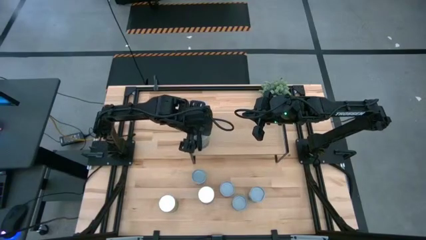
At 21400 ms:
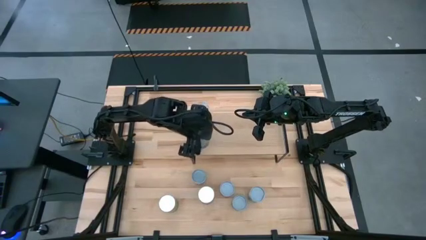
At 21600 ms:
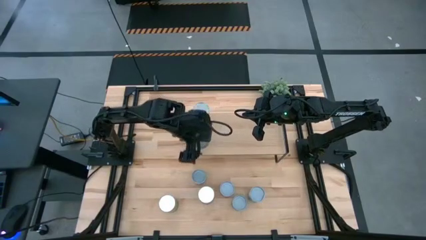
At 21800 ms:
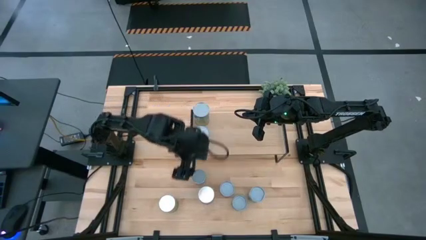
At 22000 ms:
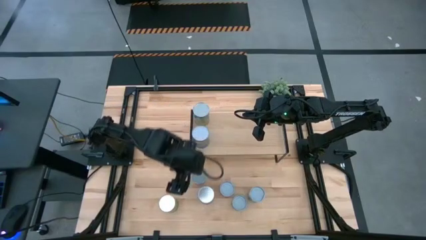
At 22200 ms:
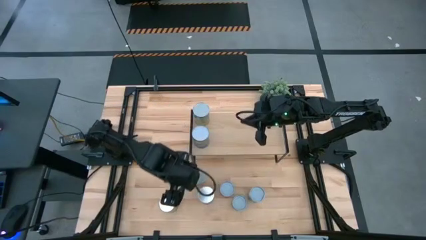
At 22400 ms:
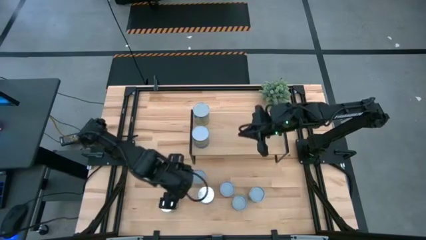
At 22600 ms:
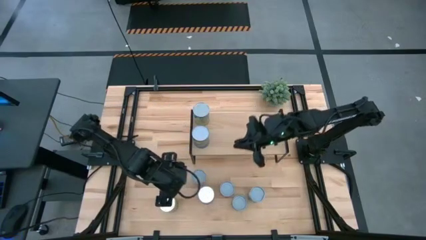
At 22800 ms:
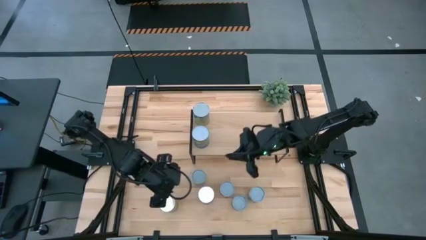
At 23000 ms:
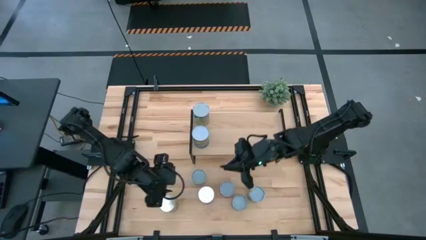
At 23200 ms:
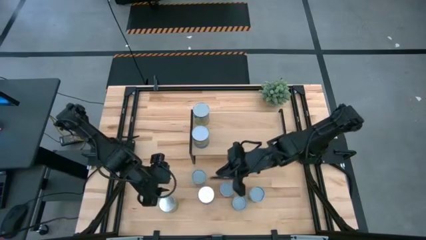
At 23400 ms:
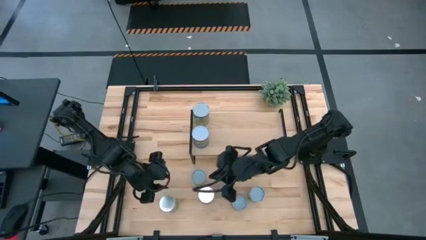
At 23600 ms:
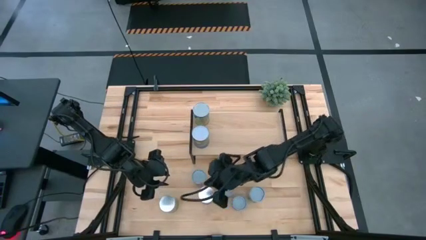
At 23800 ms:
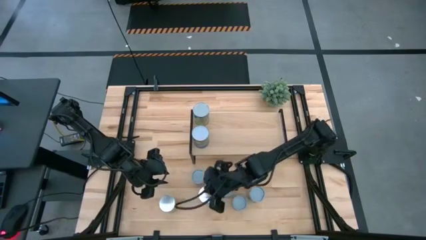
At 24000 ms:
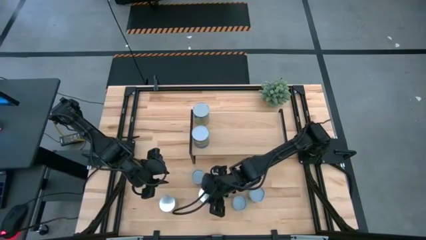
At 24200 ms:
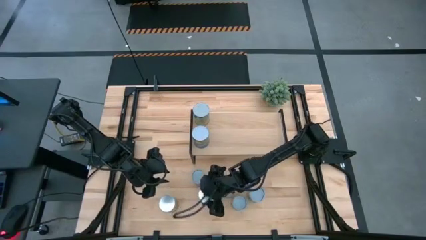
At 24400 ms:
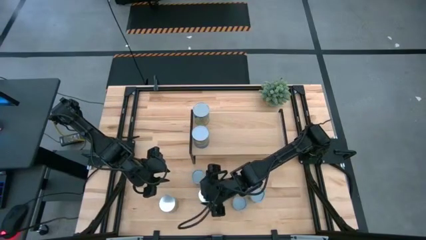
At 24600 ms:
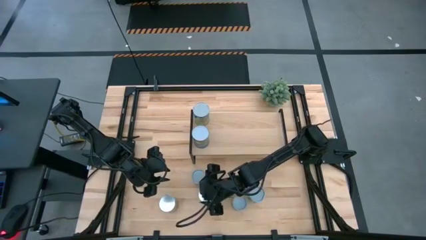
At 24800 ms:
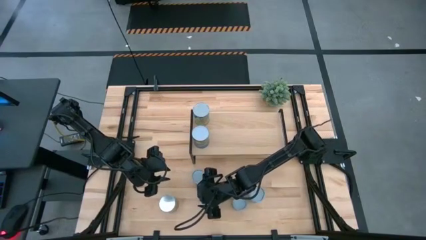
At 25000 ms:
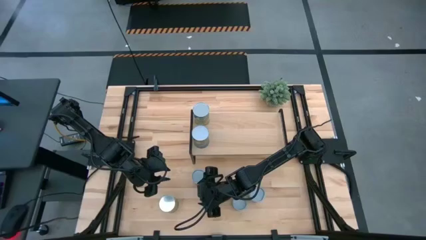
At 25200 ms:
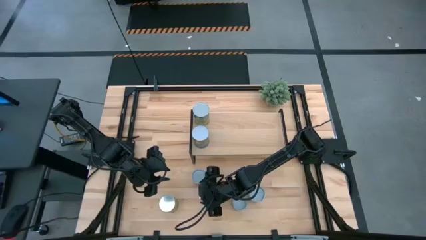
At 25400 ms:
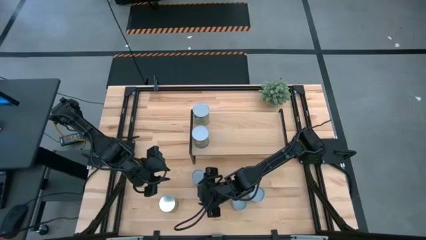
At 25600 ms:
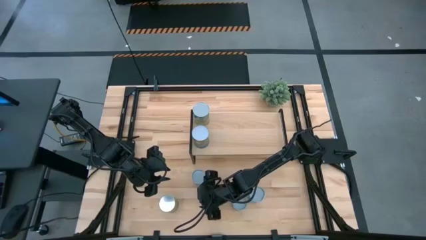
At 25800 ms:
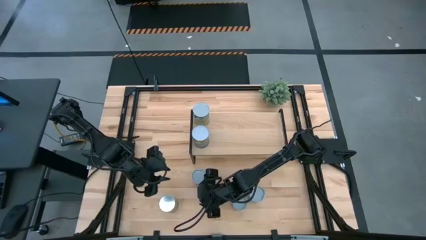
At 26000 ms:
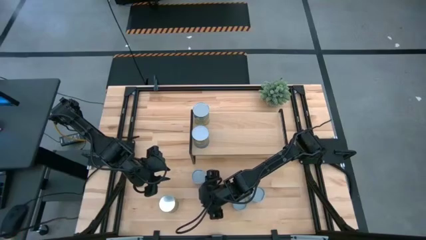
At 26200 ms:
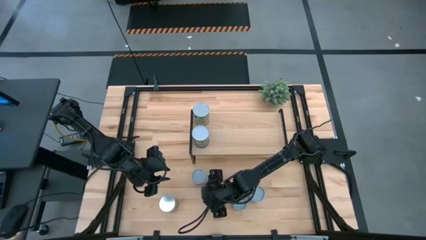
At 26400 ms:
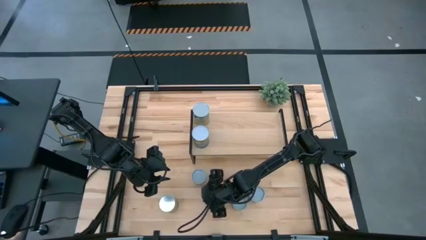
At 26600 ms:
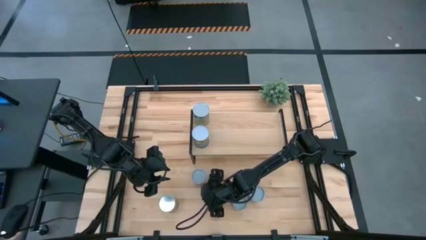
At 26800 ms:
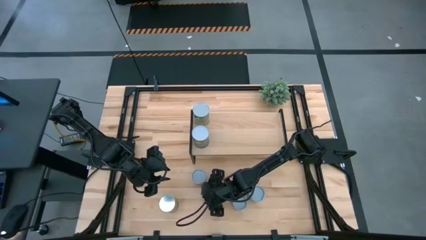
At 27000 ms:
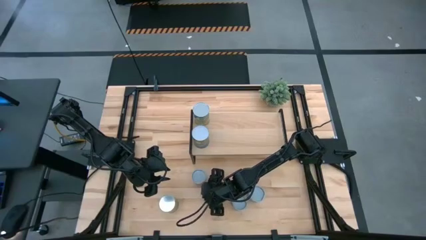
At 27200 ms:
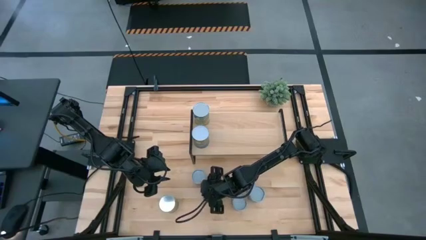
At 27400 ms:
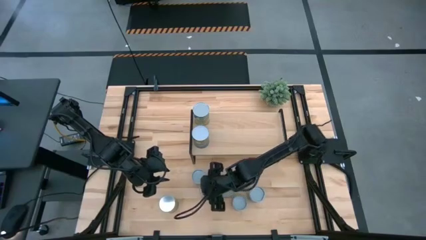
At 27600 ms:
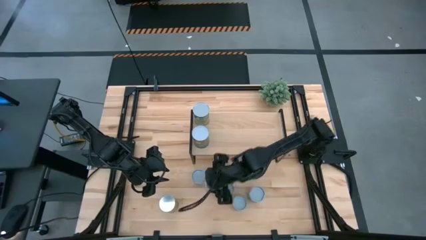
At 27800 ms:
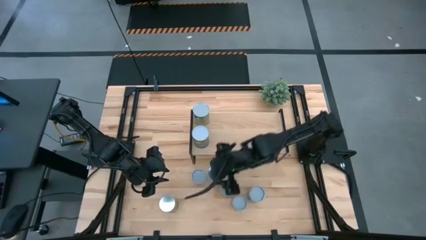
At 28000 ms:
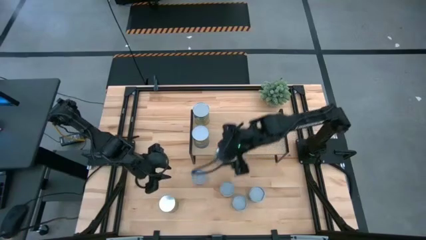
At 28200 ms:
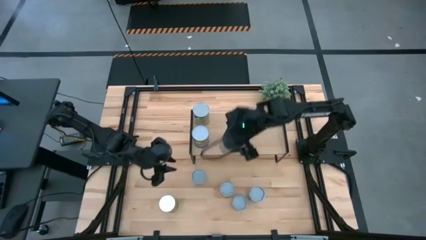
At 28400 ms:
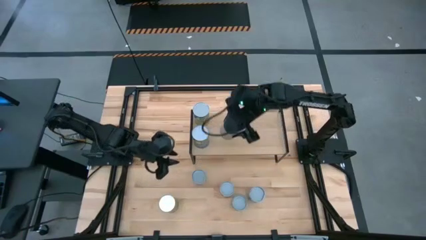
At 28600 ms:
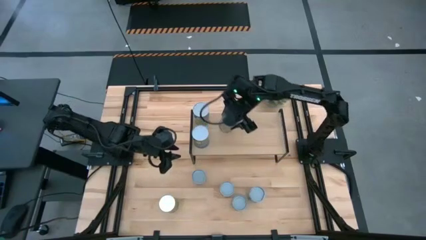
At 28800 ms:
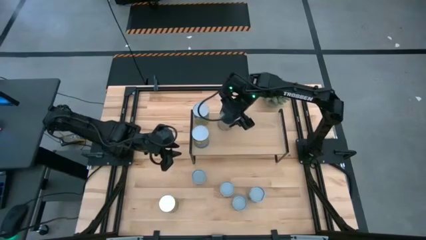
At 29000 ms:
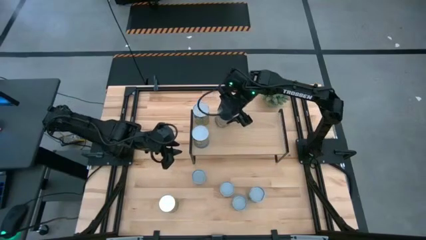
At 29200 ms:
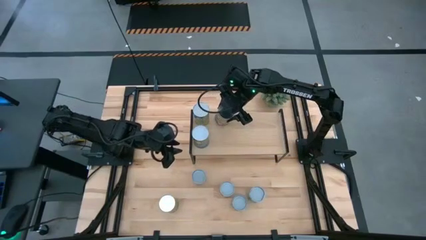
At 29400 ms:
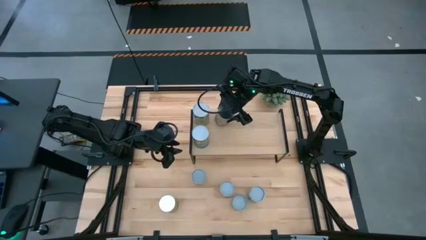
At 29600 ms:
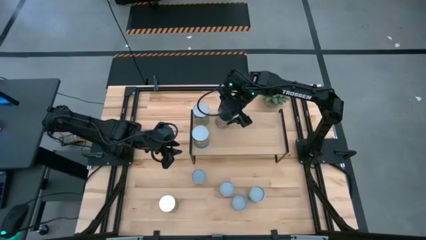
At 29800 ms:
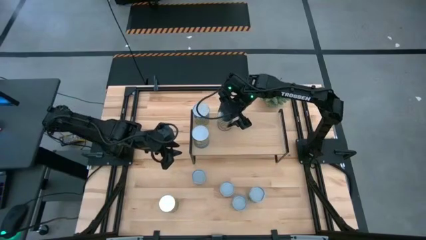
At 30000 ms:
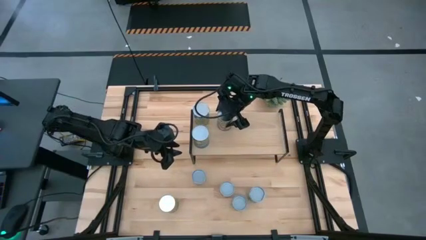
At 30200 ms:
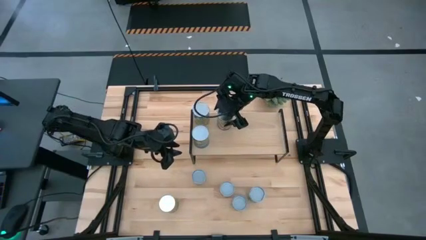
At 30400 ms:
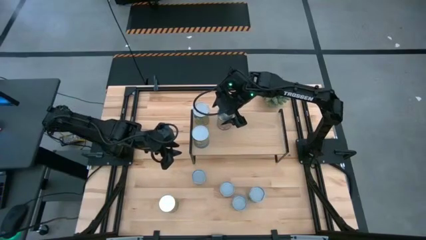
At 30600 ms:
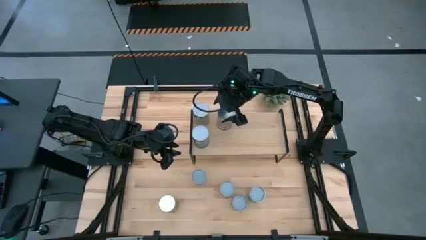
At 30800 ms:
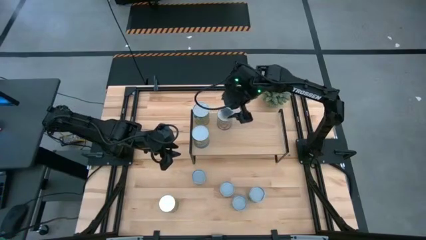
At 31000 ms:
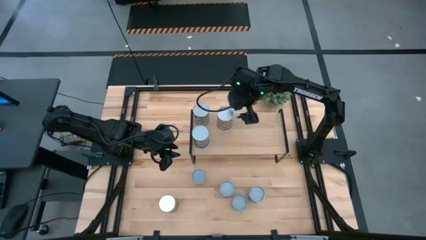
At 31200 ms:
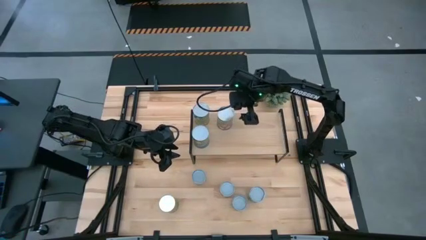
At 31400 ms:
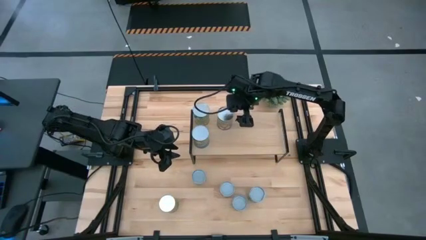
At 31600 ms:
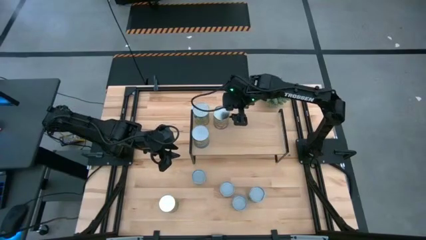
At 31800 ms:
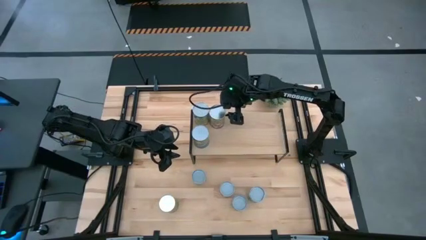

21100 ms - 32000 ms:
Task: Pick and place cans onto a shelf
Put the canned peaches on the shelf
